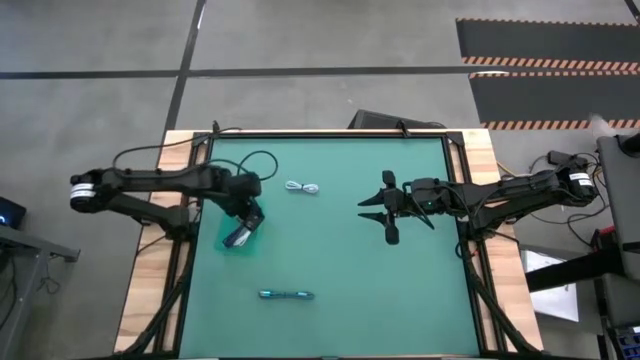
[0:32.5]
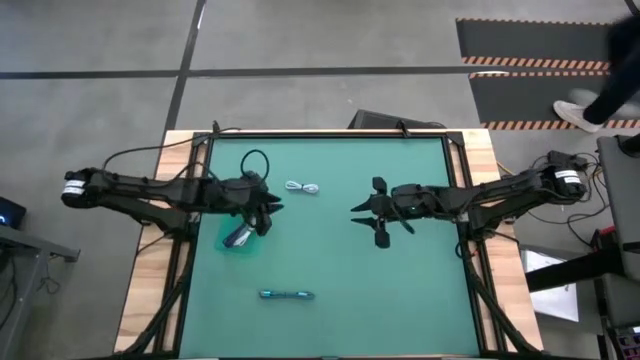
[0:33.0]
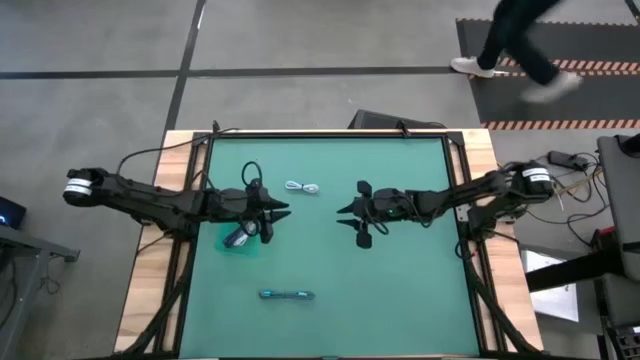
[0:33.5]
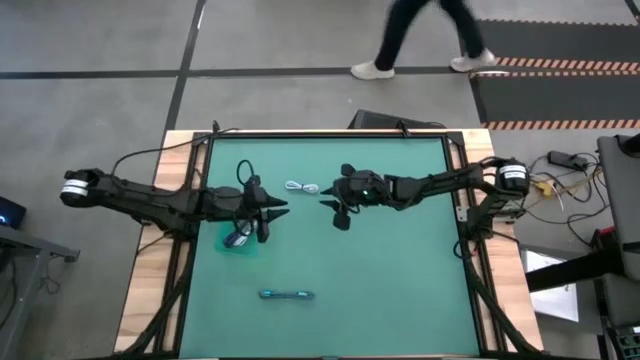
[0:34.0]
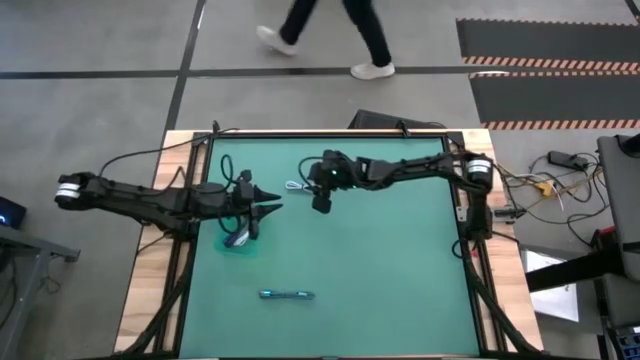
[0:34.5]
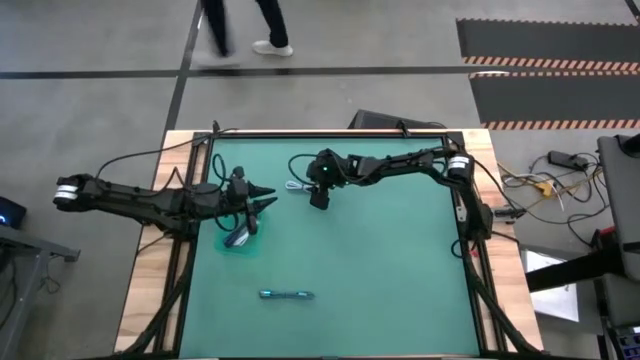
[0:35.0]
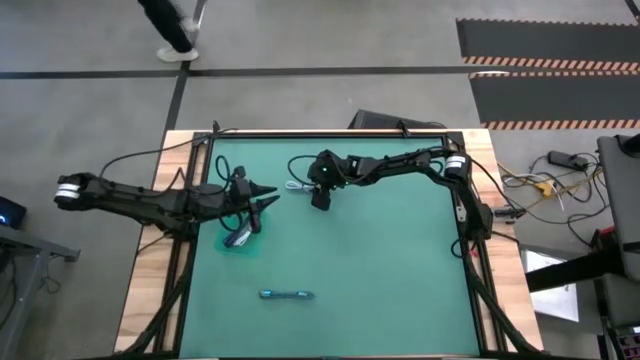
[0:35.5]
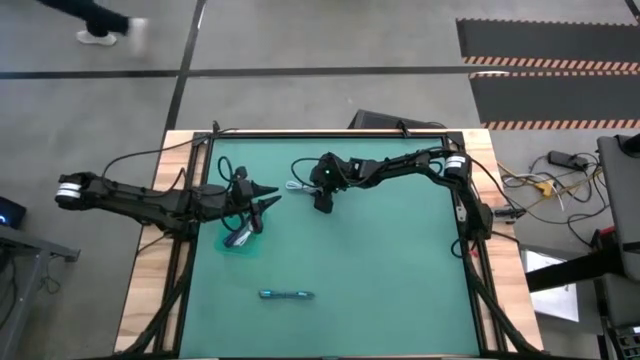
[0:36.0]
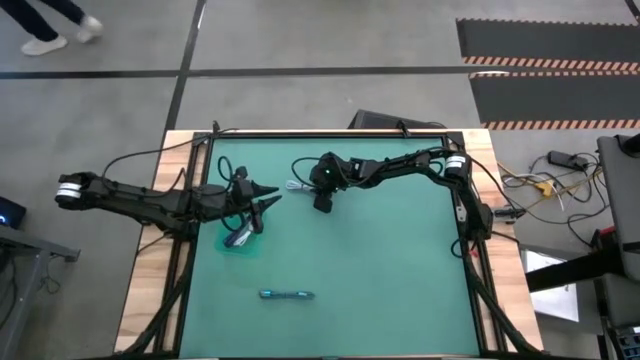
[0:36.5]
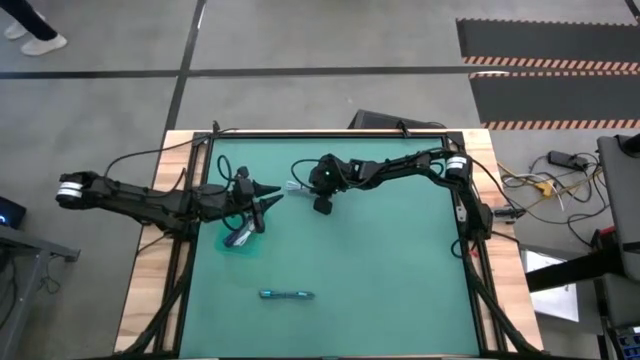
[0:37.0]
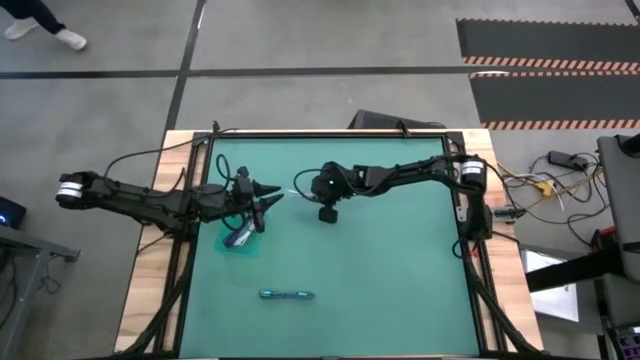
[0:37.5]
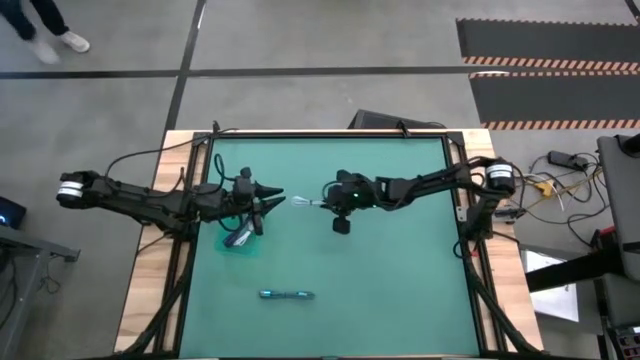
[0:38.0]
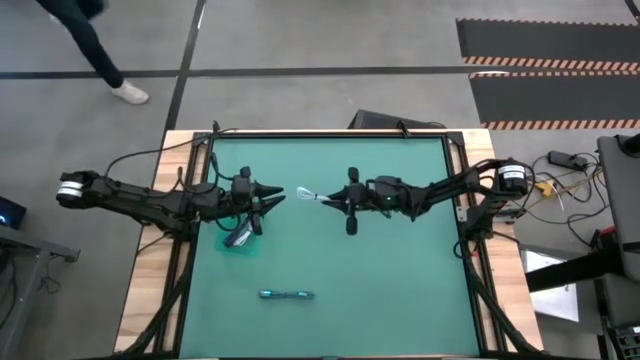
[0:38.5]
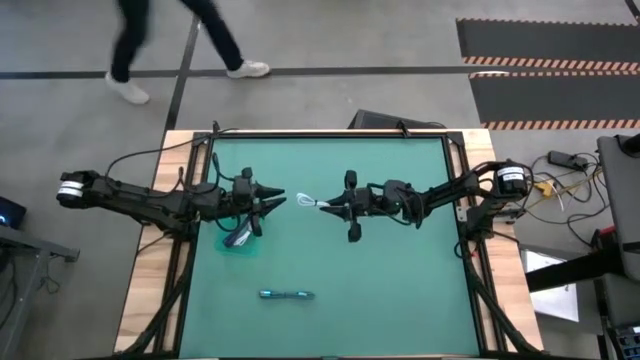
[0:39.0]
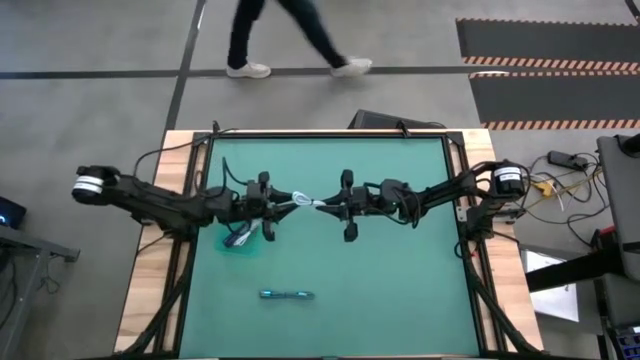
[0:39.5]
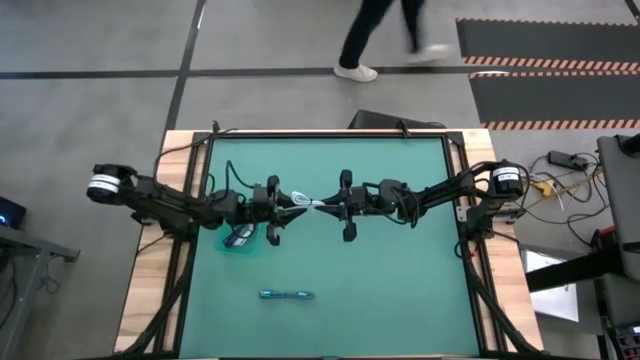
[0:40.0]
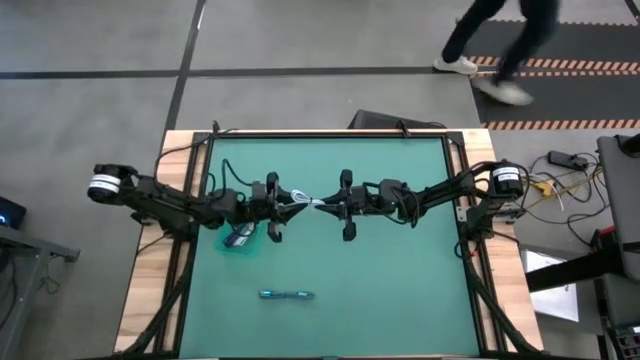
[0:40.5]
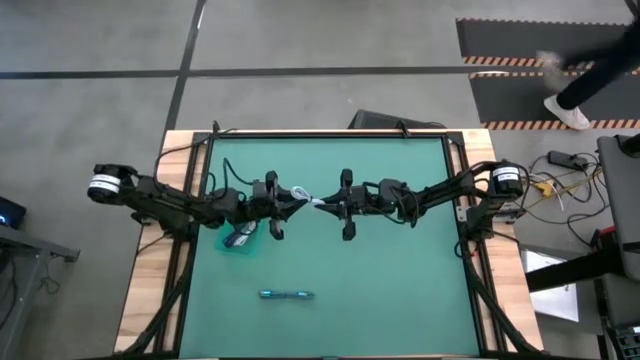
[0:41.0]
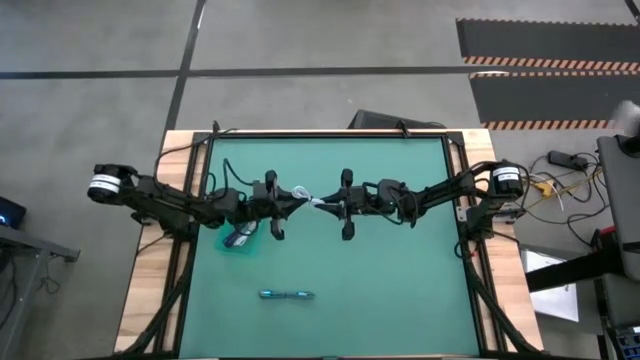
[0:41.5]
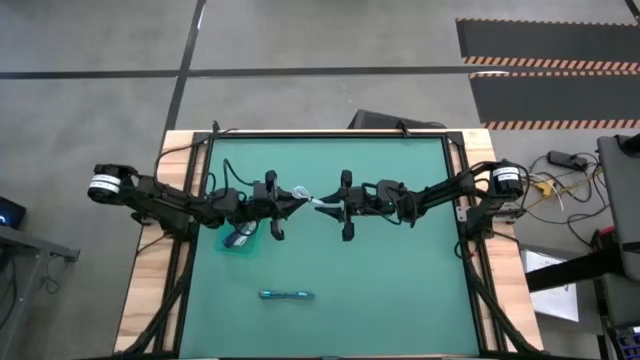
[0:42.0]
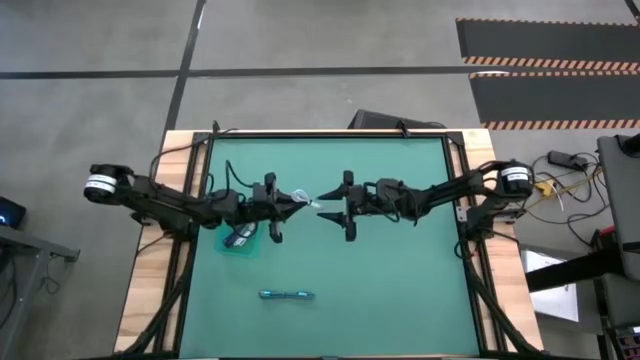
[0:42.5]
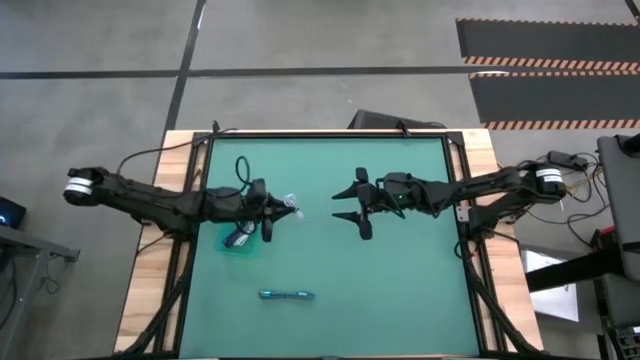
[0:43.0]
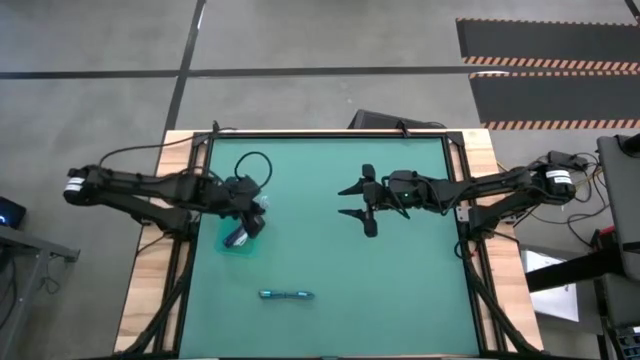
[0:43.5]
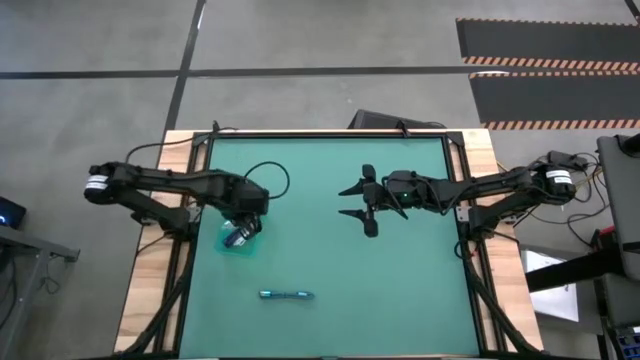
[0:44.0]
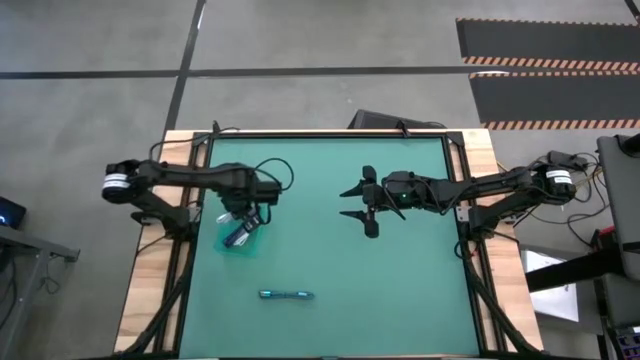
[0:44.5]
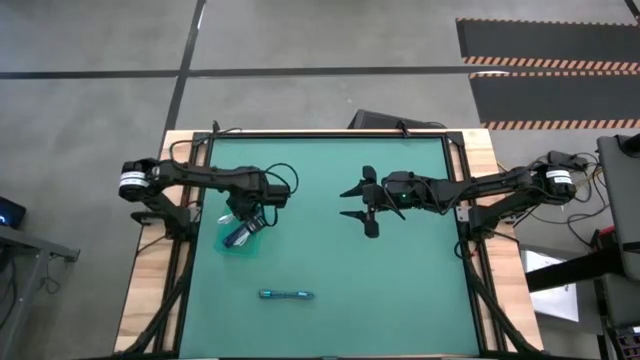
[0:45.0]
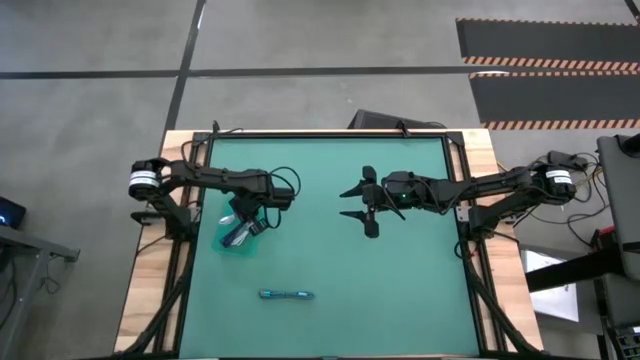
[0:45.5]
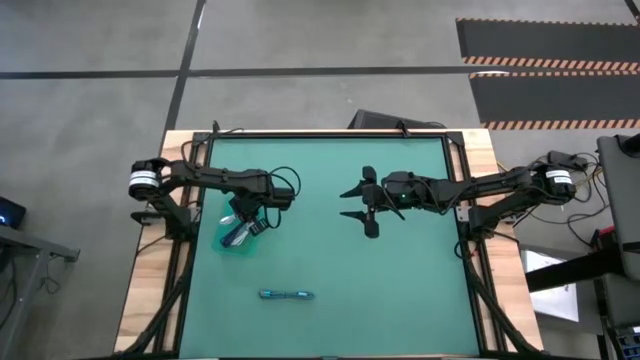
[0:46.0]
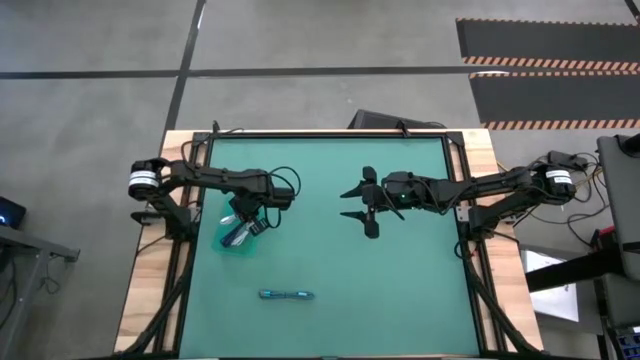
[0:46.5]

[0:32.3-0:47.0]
Task: Pick and place USB-C Cables
Put the light blue charger cable into the green bin

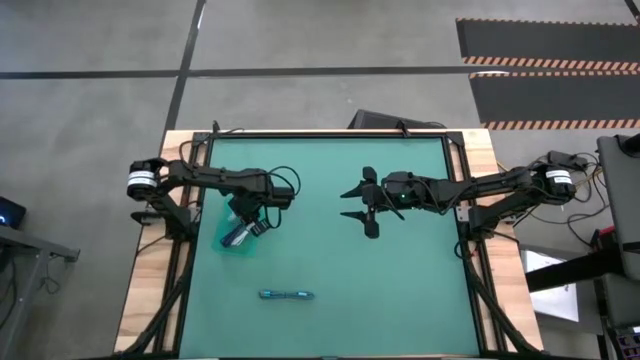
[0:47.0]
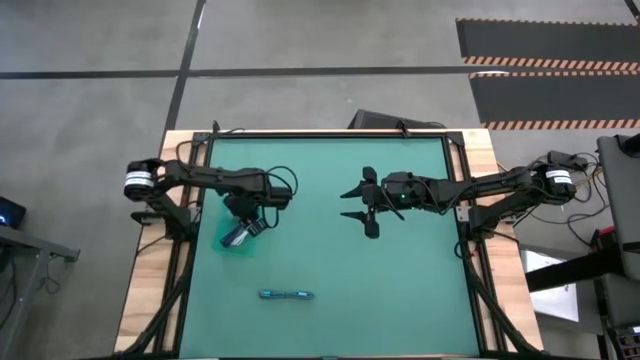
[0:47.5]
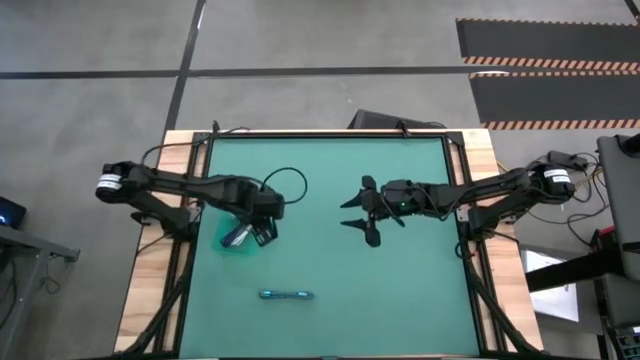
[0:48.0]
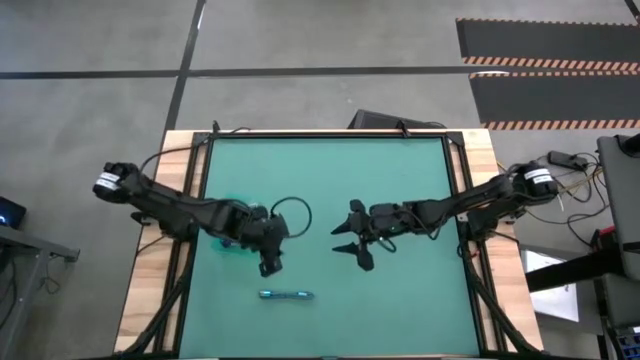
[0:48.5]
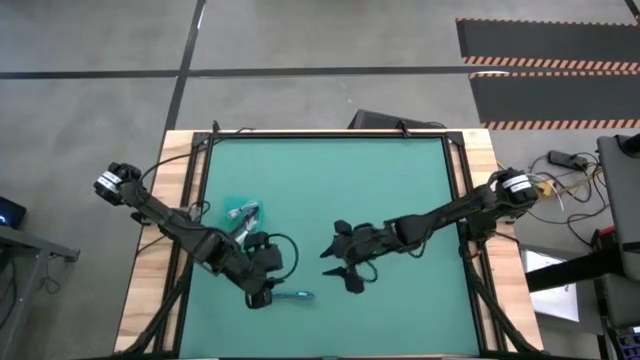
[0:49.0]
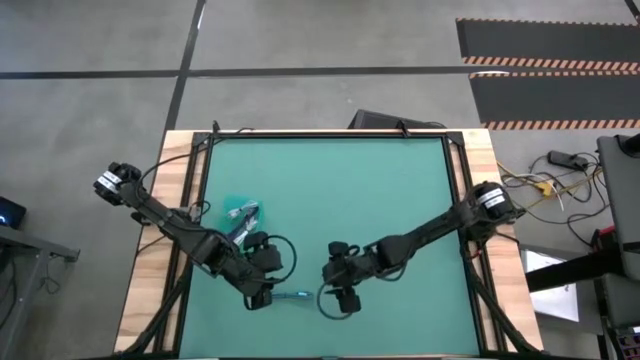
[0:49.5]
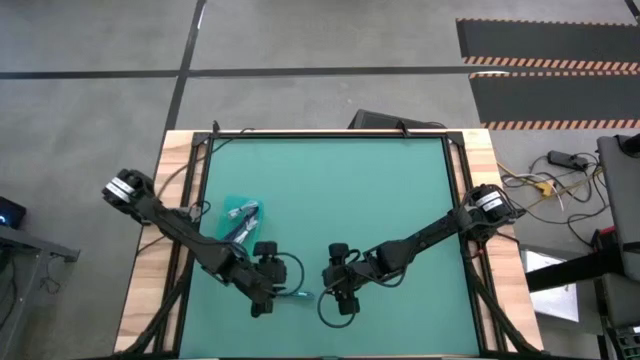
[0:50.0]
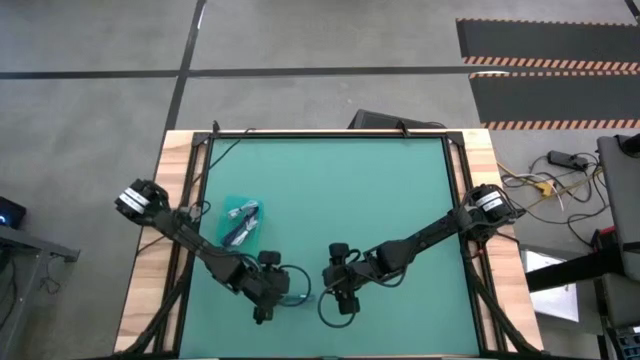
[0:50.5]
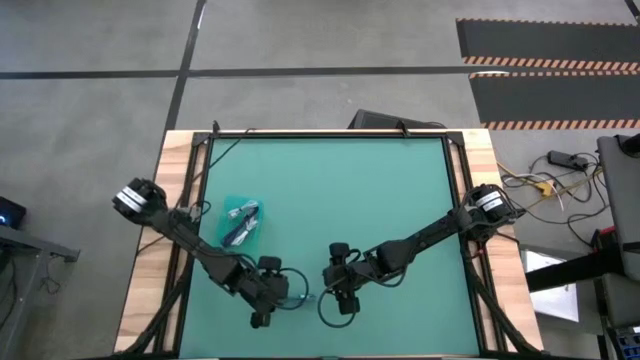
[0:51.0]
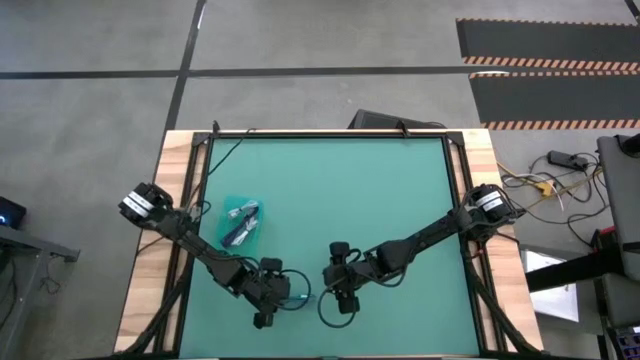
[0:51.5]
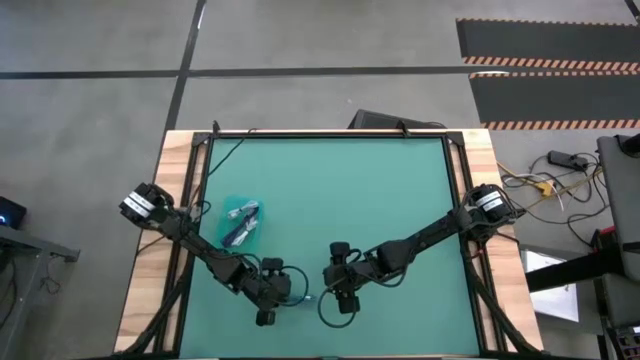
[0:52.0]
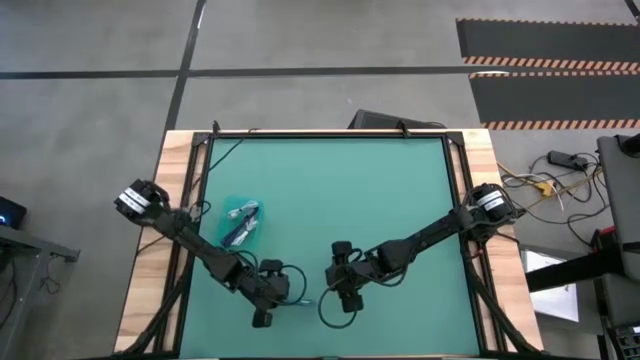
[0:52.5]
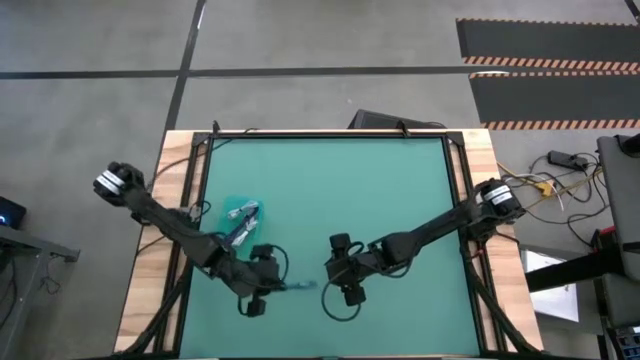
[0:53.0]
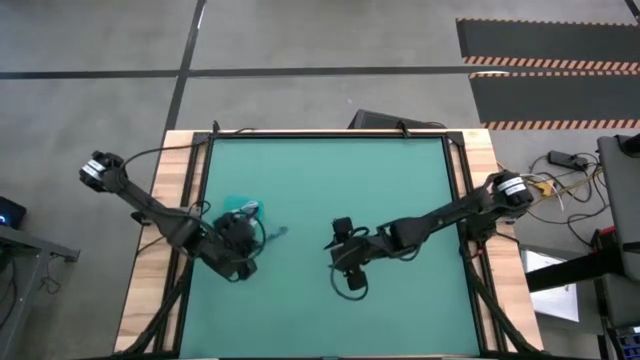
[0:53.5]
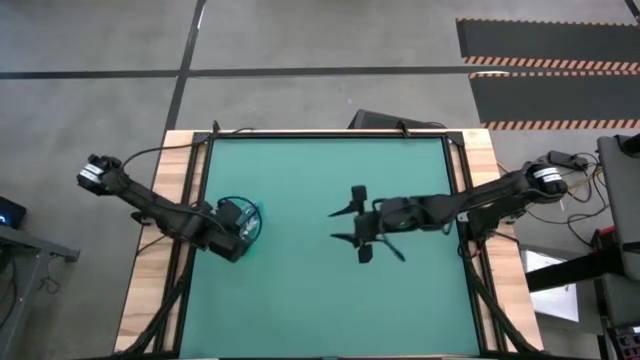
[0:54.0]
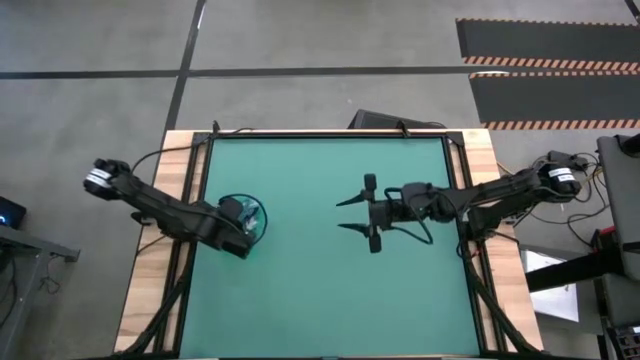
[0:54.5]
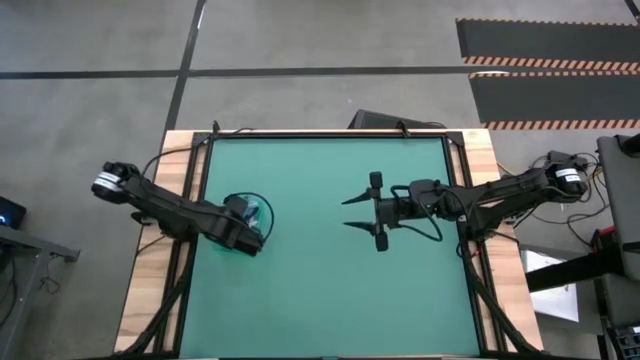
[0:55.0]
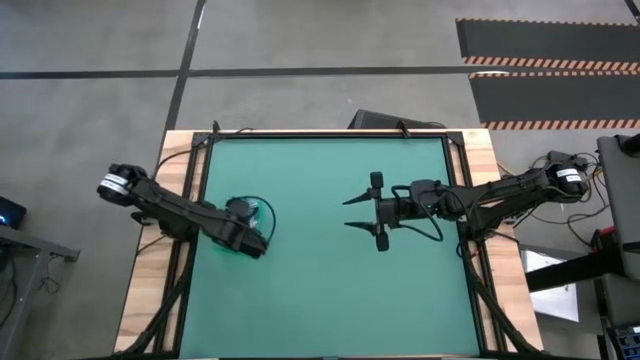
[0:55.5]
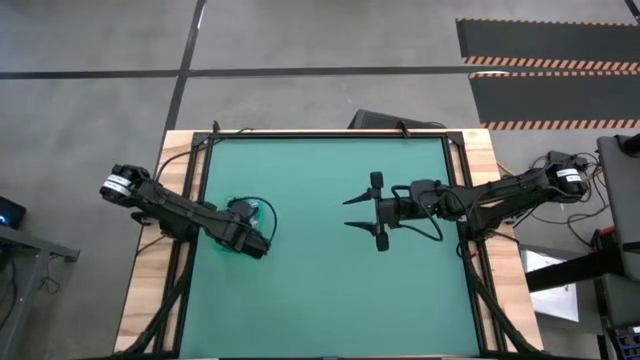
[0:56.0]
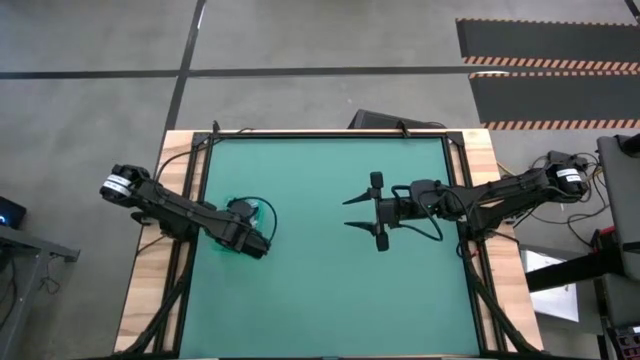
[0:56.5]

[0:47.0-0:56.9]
Put the blue charger cable into the green bin
